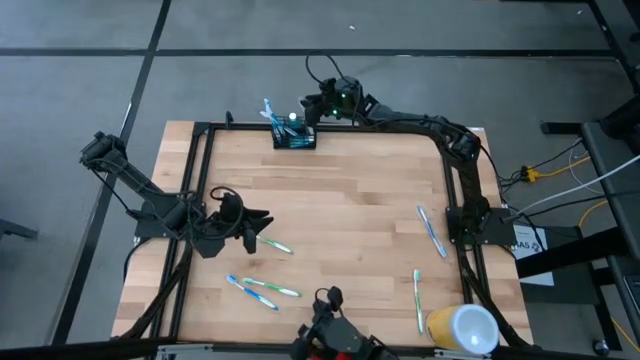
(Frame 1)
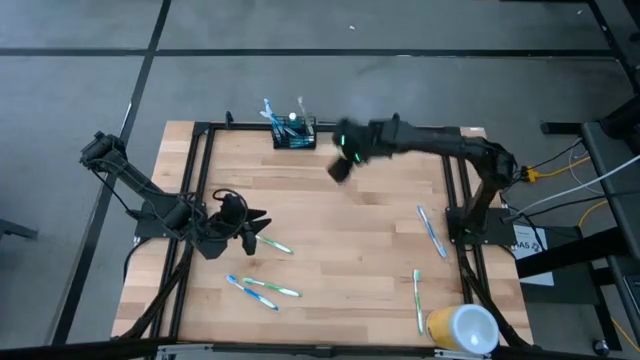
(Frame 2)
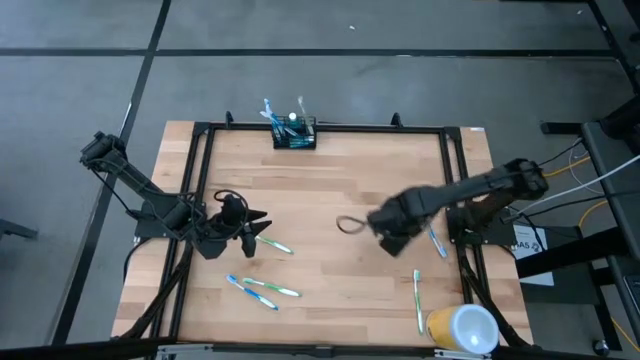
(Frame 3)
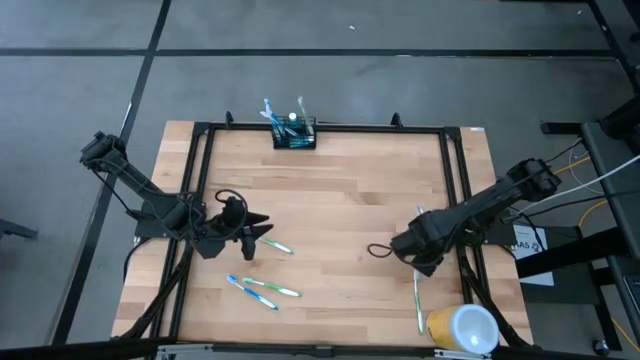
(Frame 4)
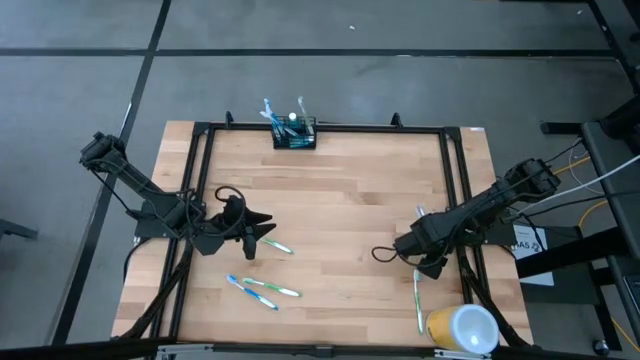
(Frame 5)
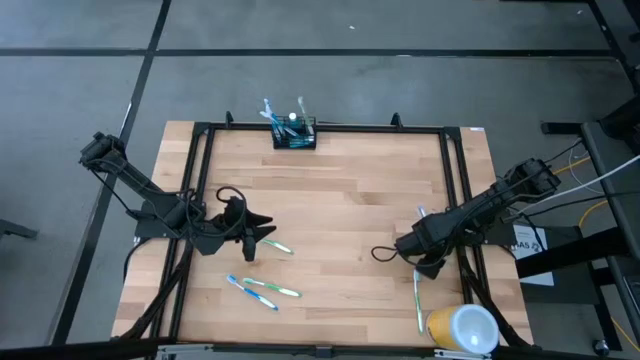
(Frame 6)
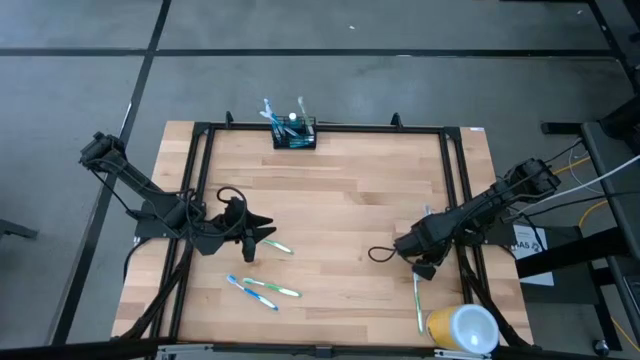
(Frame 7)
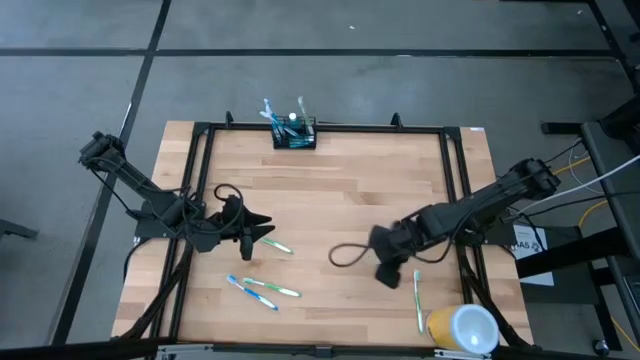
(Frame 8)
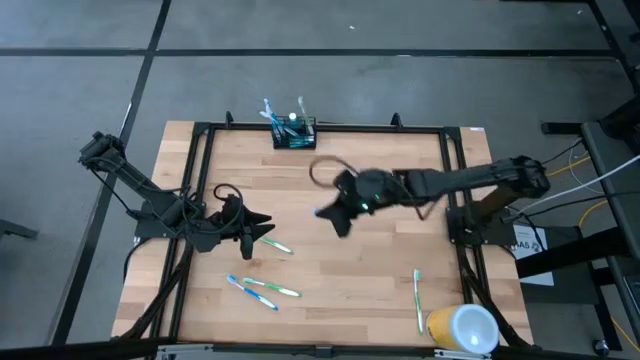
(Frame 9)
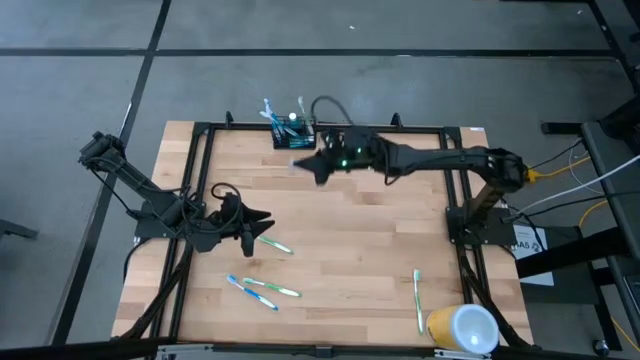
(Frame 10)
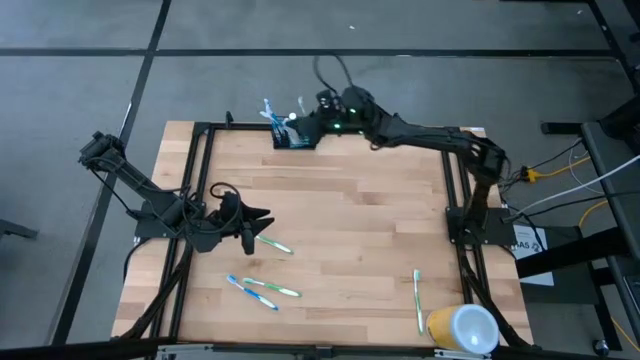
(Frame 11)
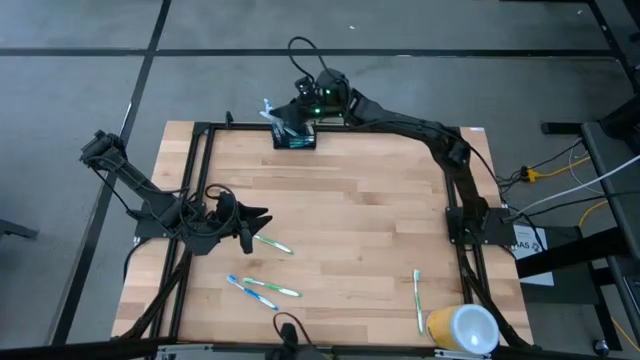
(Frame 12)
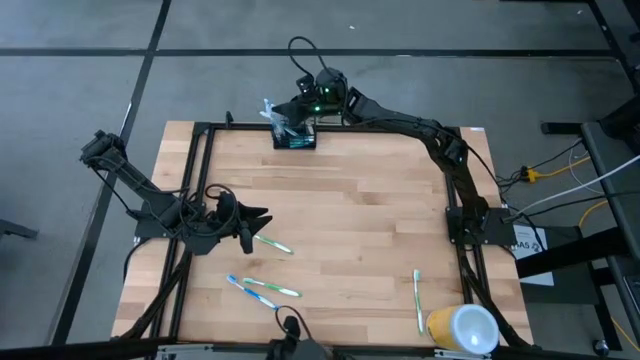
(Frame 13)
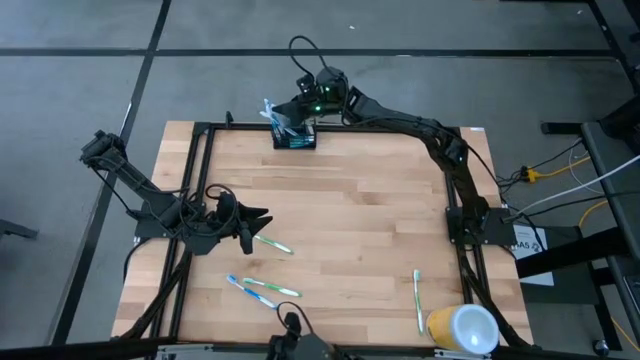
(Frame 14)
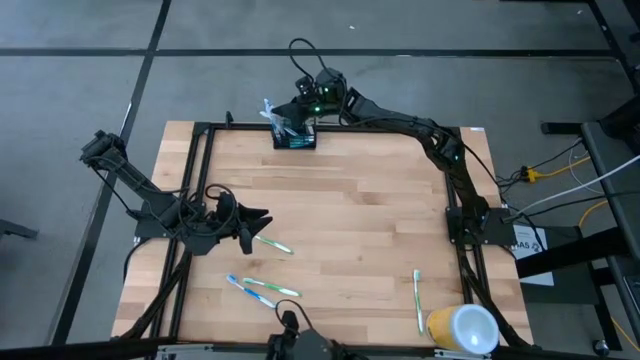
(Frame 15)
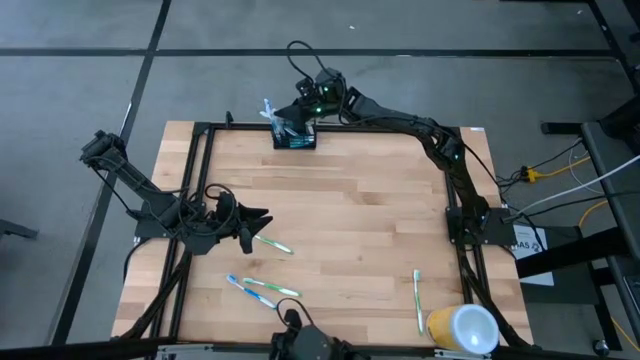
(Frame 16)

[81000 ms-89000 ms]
Task: Pick & Place toothbrushing station
Put the blue toothbrush into the black wire organizer

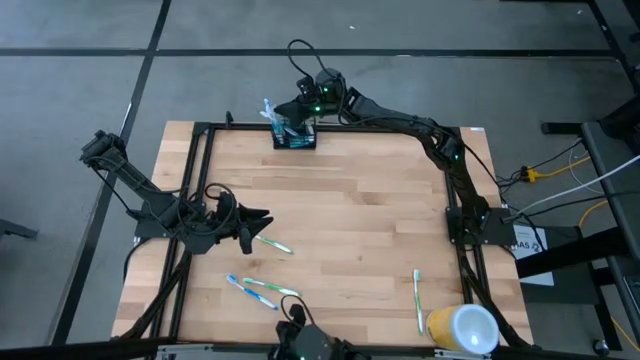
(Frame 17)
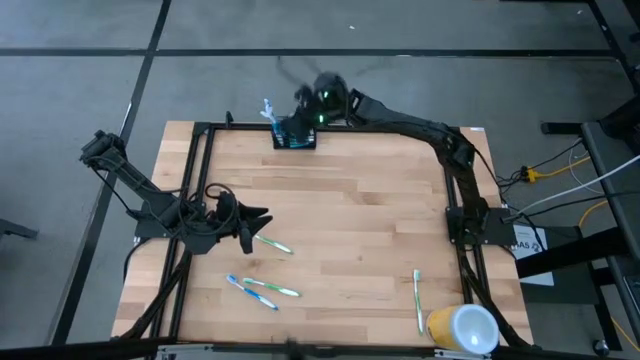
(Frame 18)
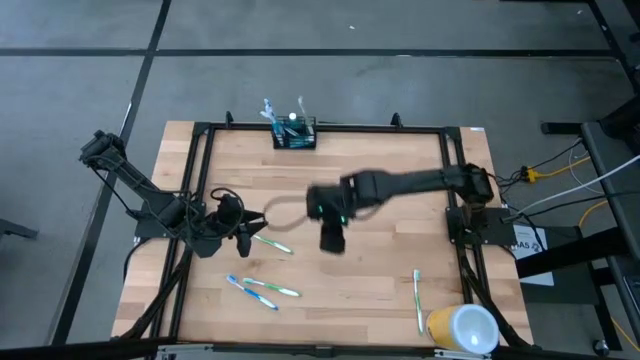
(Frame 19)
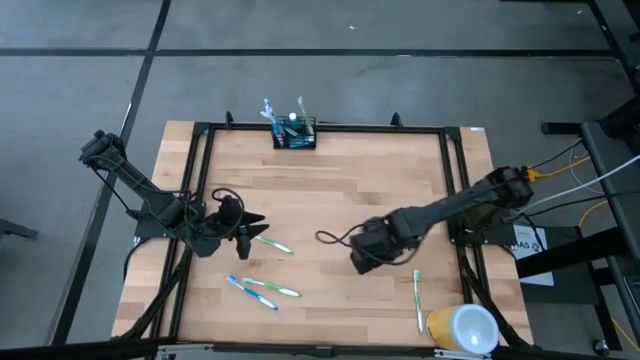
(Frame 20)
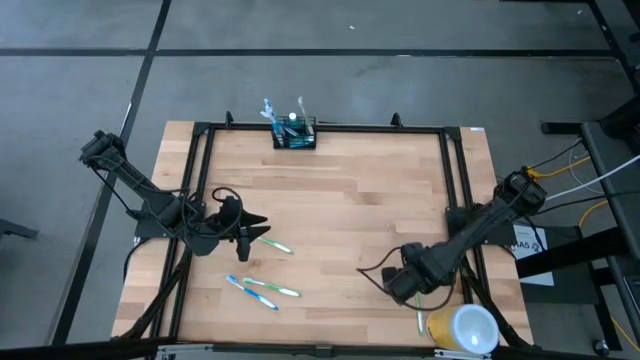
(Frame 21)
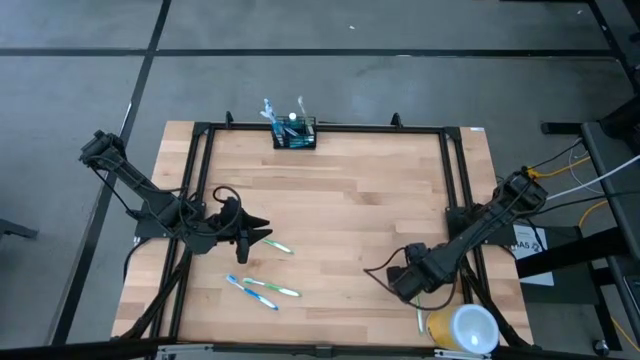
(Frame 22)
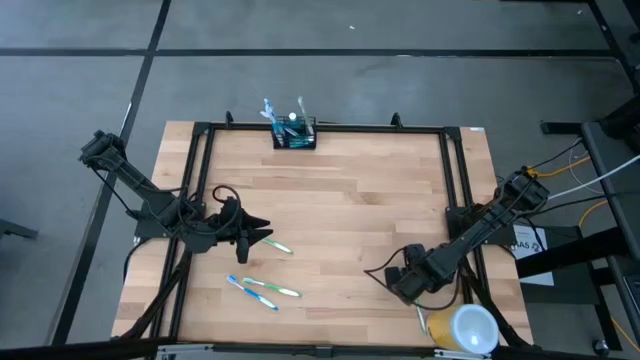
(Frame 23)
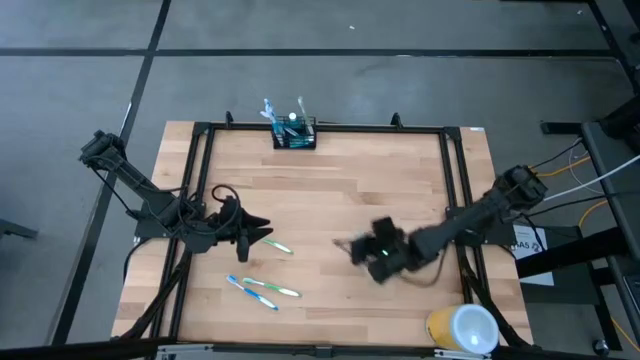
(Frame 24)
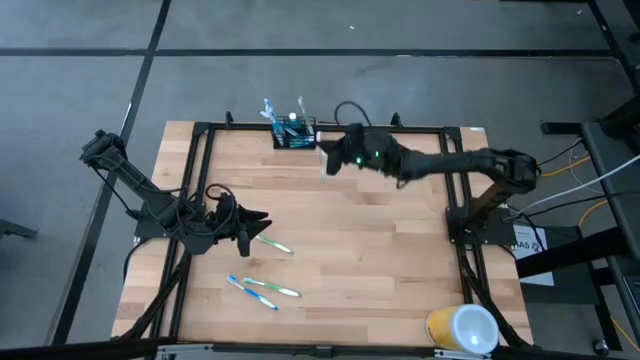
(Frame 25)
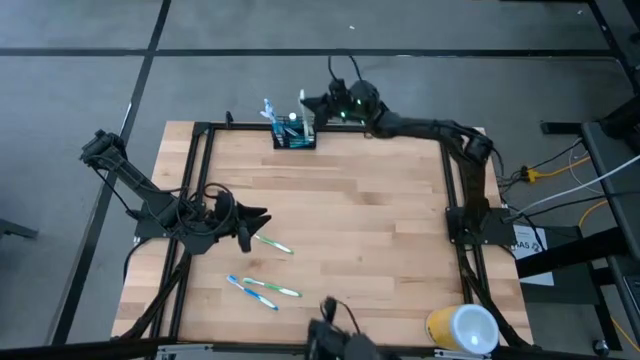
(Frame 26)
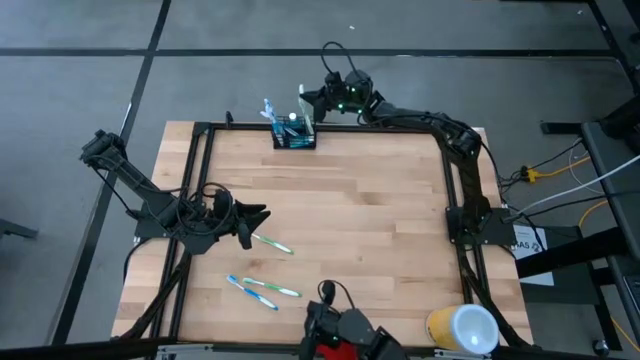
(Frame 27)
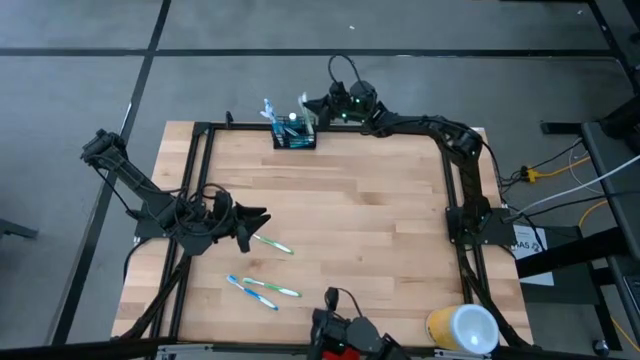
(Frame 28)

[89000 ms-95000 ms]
Put the green toothbrush into the black wire organizer

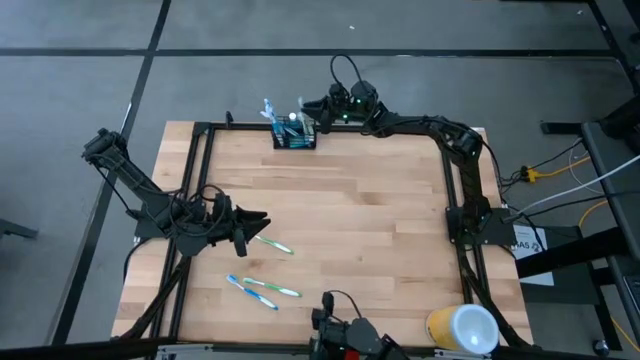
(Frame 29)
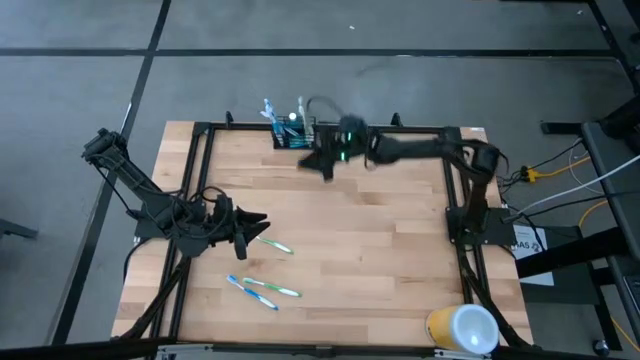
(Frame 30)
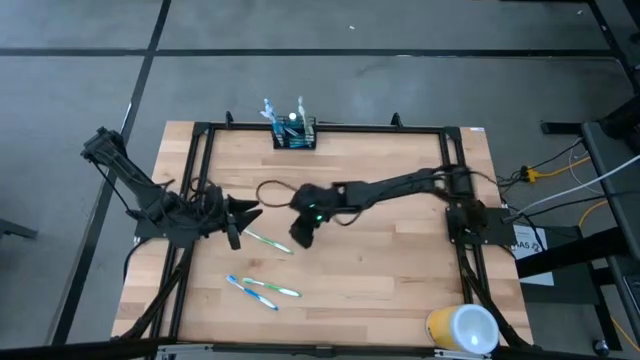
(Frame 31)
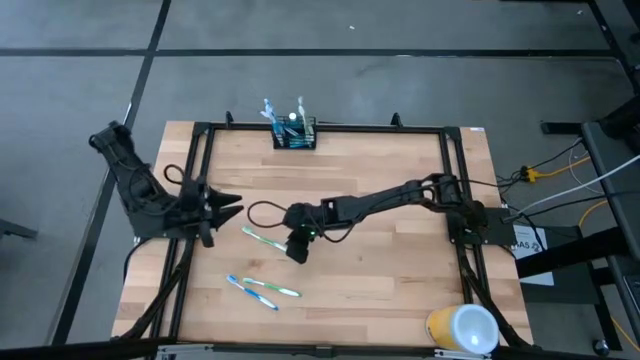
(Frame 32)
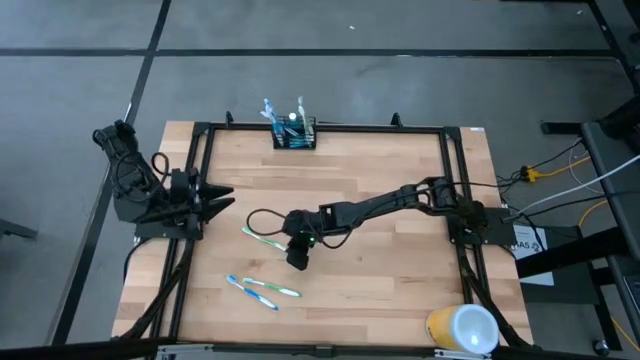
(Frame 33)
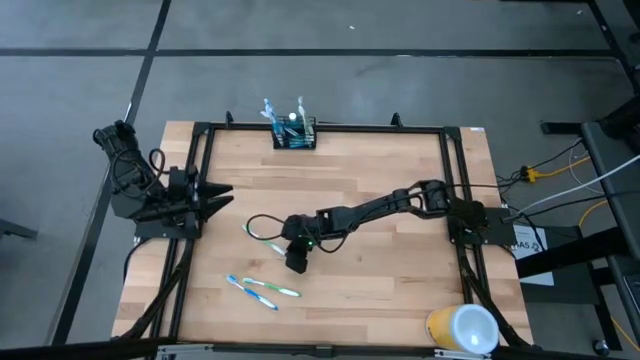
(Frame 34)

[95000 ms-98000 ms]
Put the green toothbrush into the black wire organizer
